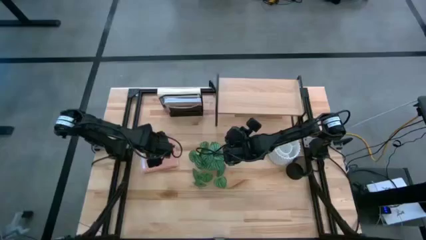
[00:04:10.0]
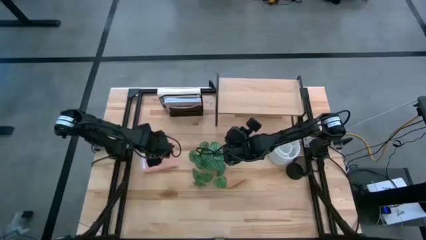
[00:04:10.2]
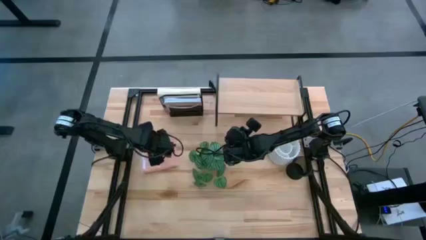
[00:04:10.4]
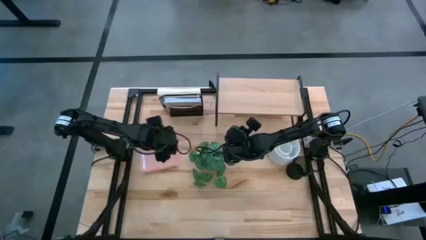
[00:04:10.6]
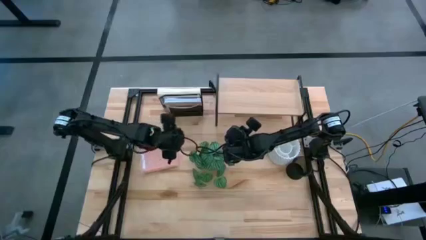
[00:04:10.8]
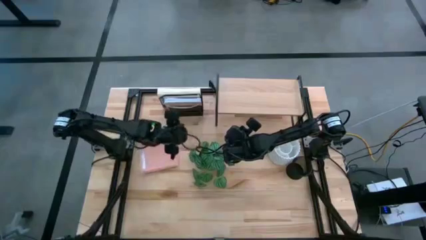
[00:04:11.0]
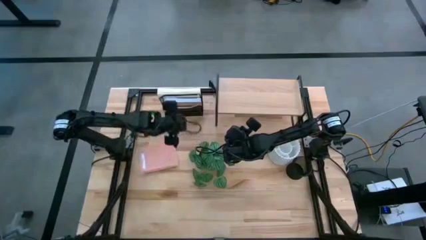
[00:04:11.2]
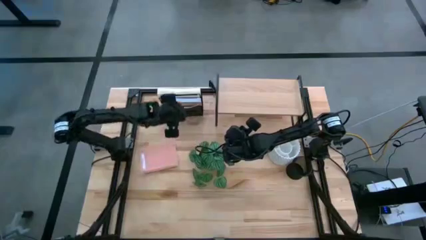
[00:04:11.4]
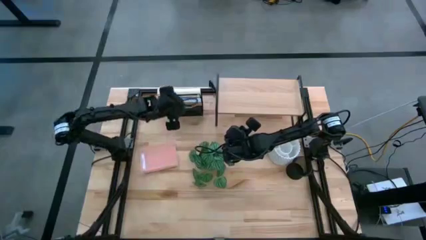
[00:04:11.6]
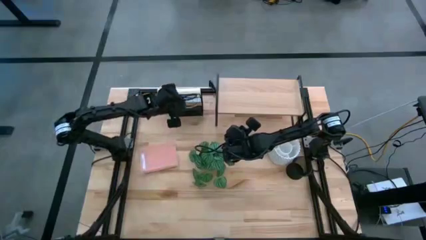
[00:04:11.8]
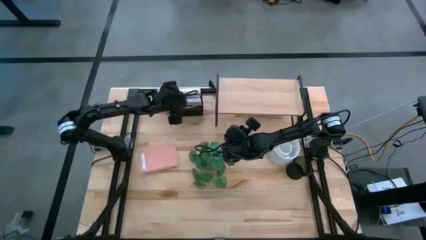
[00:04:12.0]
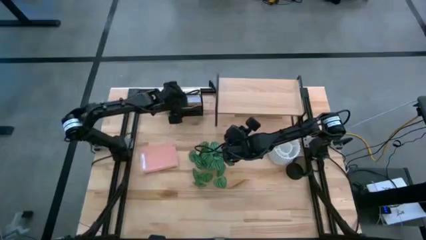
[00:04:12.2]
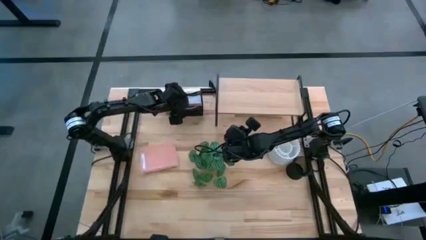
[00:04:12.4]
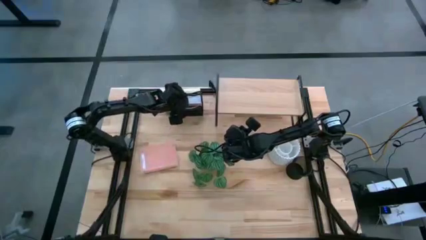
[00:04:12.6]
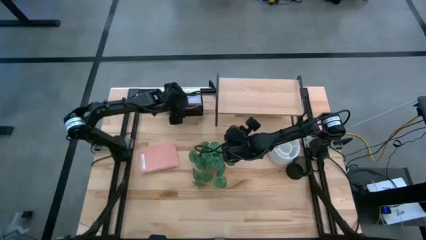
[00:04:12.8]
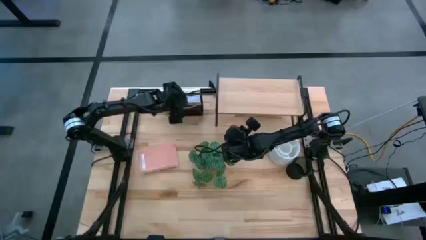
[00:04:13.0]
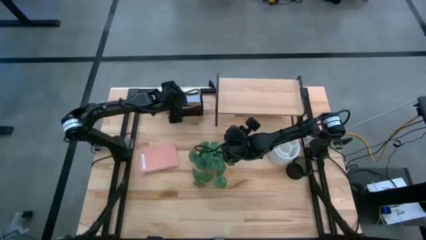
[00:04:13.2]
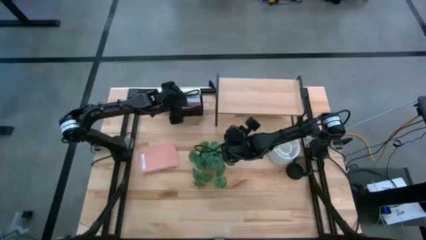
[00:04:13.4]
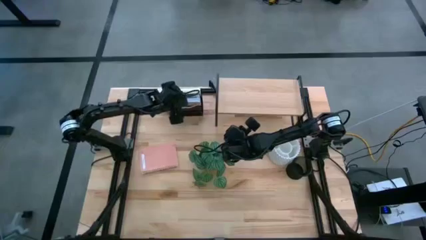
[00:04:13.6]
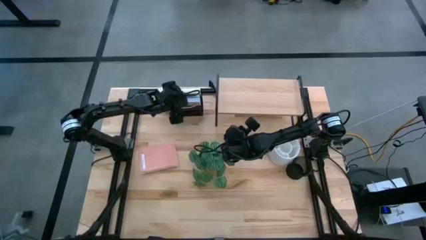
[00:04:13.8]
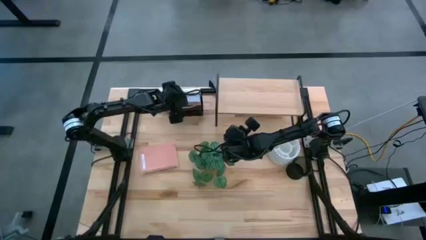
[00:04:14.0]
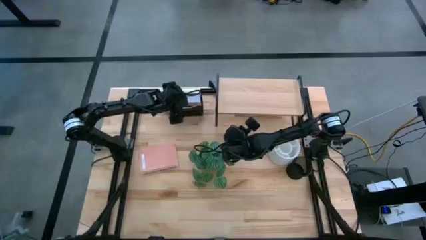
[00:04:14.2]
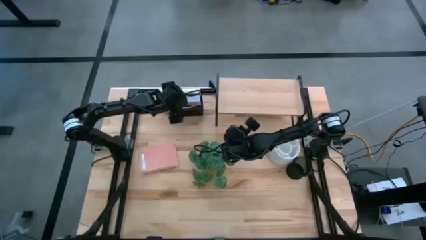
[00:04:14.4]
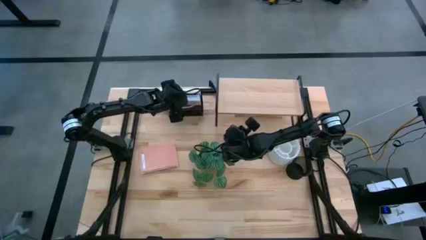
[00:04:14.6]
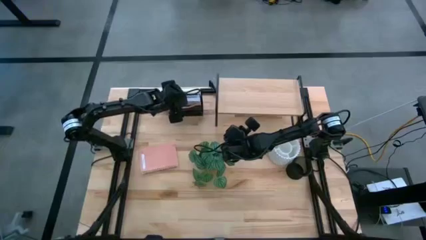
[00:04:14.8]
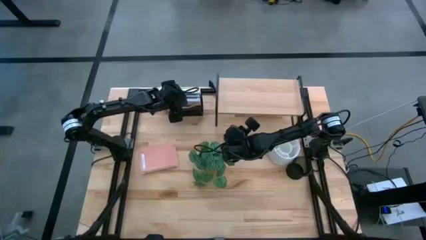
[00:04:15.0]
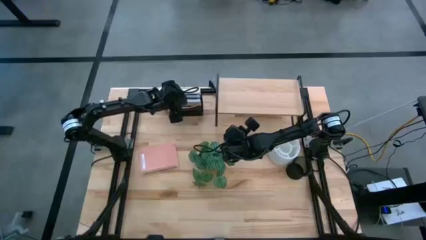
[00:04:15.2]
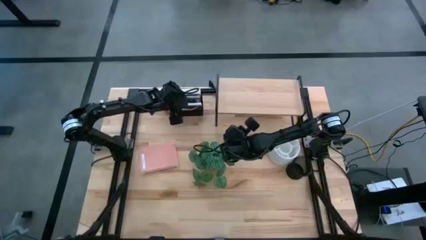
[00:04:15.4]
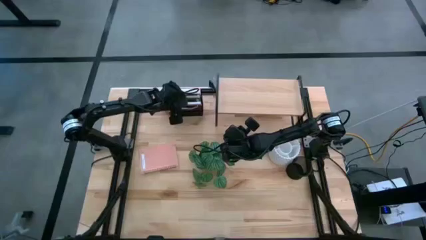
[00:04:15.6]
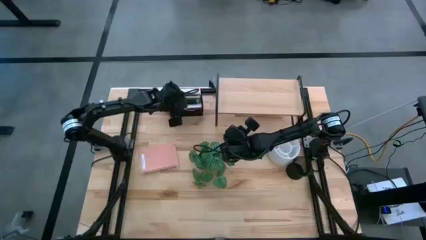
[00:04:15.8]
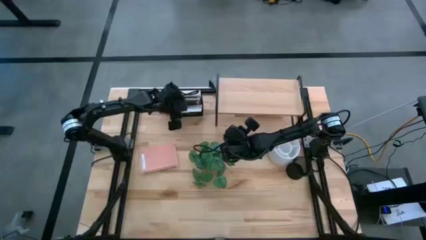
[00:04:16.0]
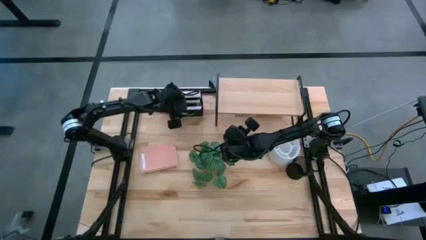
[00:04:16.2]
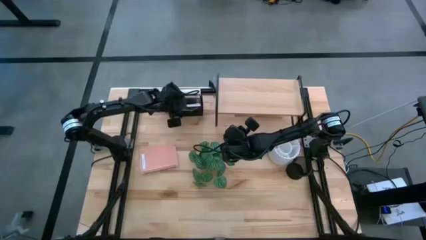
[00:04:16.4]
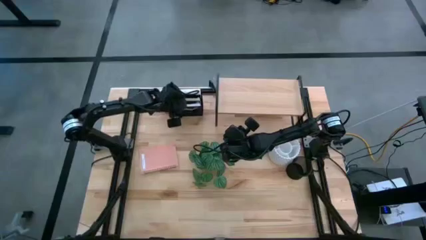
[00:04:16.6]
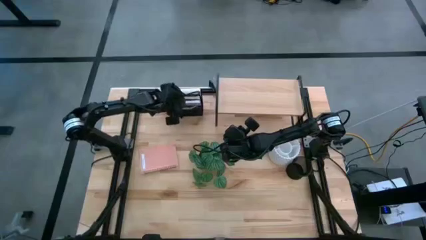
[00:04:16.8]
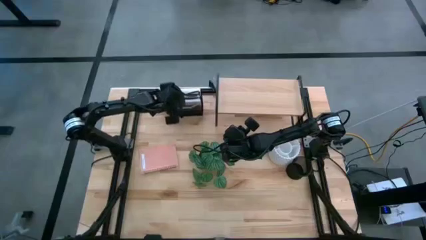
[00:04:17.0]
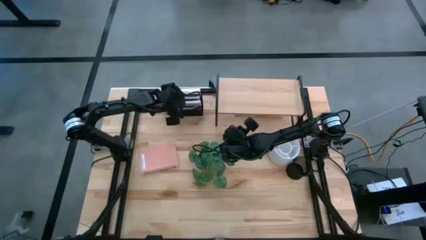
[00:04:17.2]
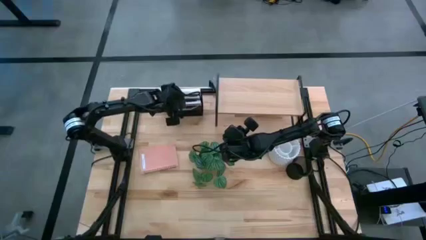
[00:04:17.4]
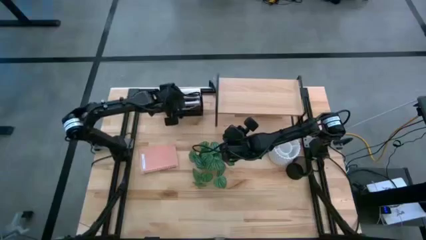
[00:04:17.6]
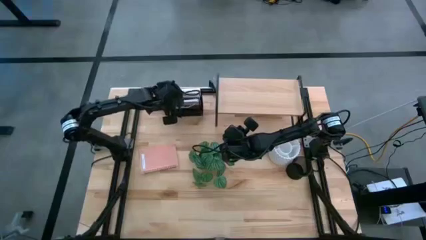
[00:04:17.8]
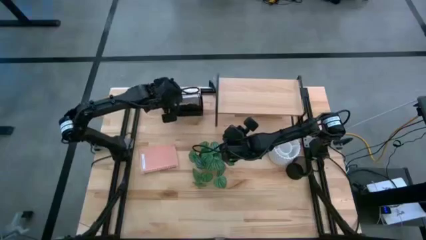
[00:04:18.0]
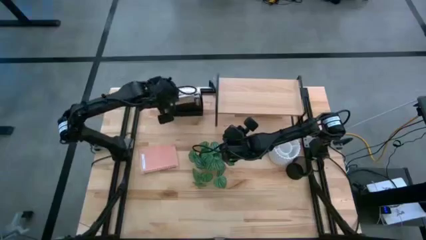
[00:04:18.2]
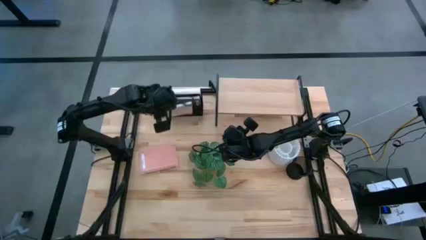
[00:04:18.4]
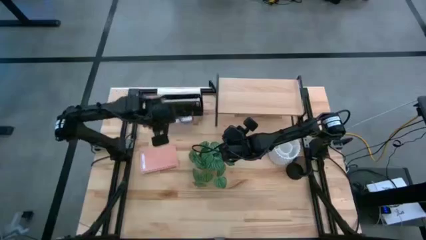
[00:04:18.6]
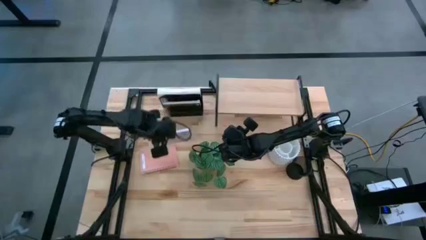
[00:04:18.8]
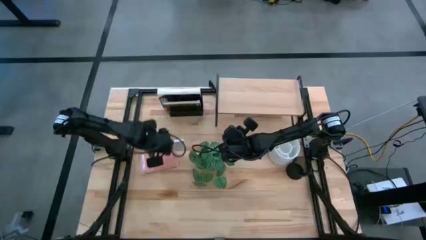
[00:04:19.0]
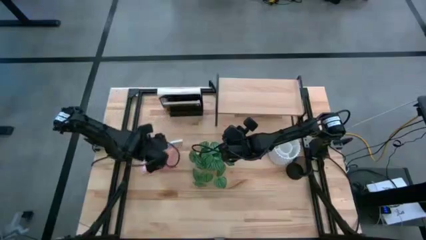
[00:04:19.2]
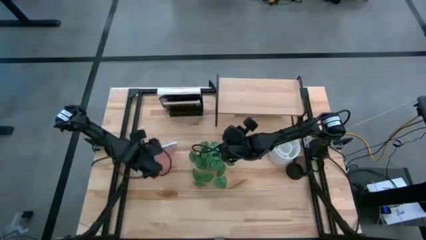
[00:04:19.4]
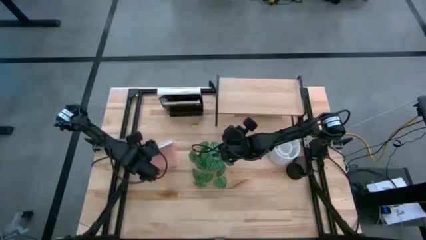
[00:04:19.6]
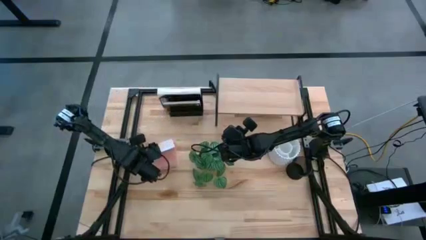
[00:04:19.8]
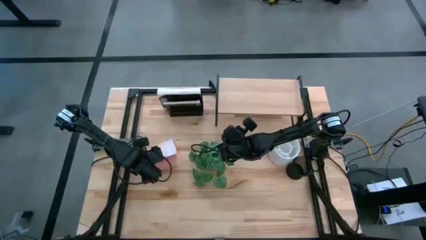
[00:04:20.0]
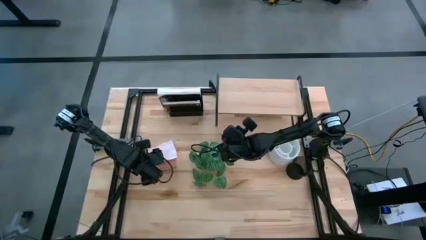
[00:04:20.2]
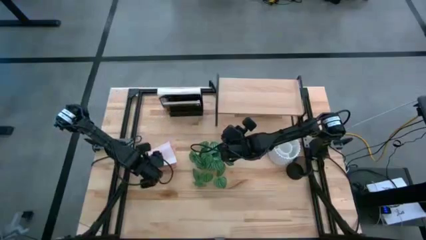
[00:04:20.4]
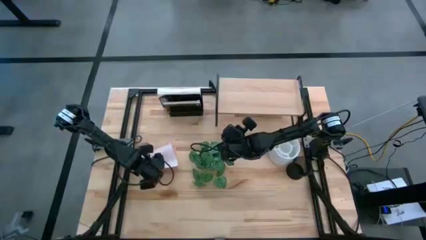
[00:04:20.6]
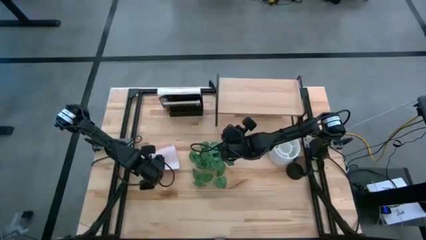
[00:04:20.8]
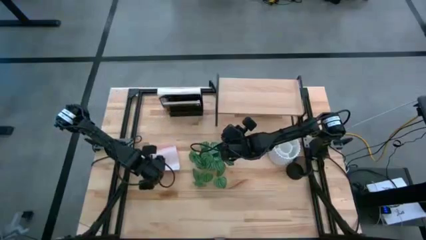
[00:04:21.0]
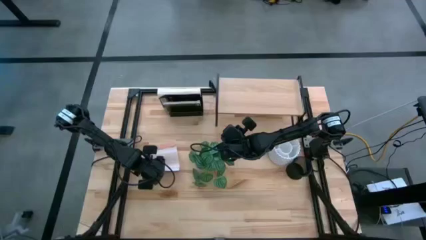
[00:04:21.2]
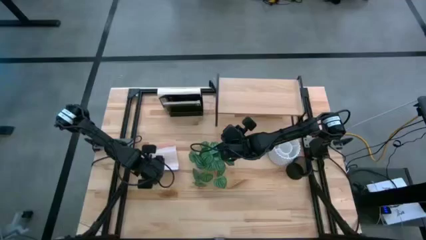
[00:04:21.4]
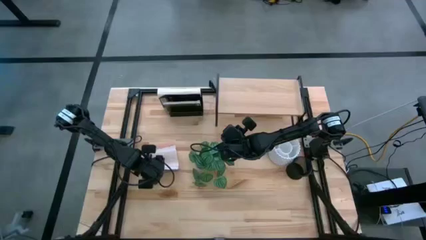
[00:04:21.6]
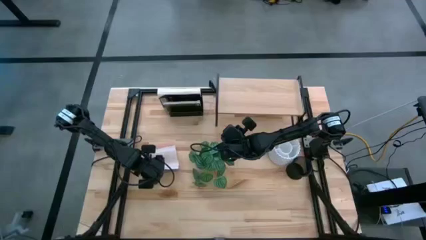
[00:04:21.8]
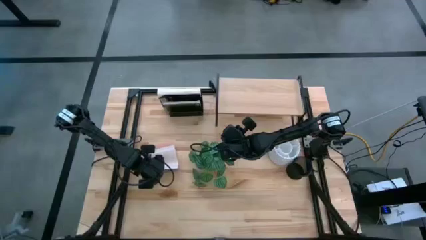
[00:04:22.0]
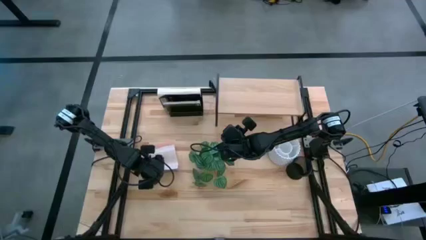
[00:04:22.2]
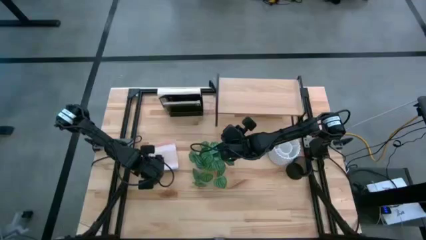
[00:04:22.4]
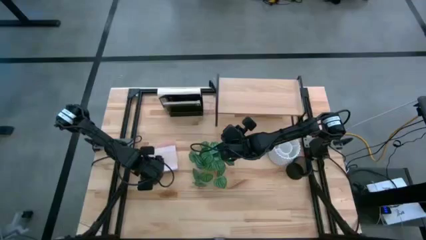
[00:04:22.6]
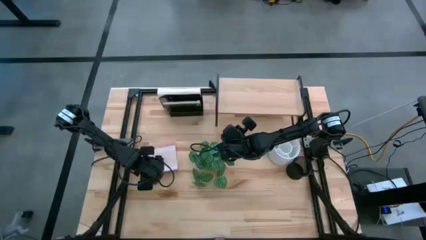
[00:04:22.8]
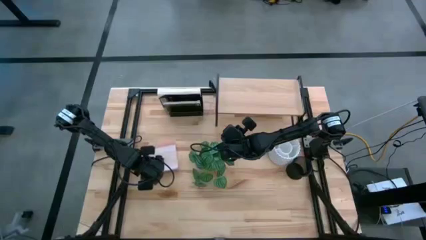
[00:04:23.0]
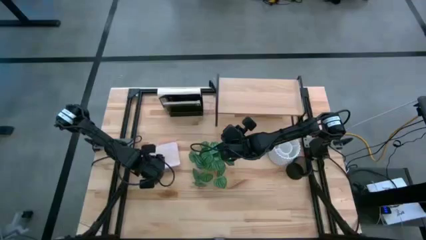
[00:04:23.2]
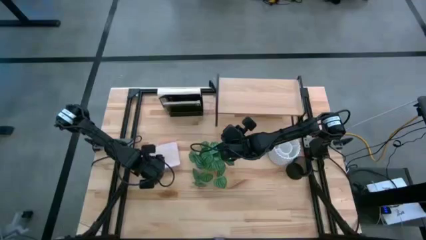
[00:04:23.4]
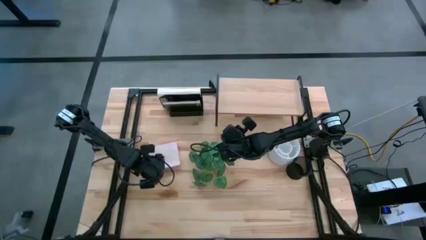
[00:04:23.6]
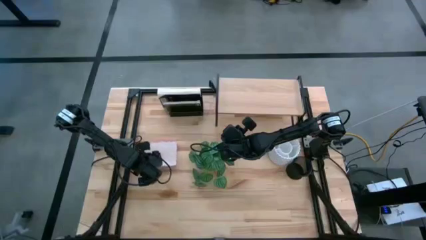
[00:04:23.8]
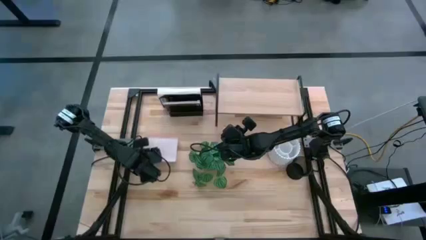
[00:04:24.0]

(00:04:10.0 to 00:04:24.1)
Task: Stock shelves
Remove the white notebook from the black mesh bookshelf
